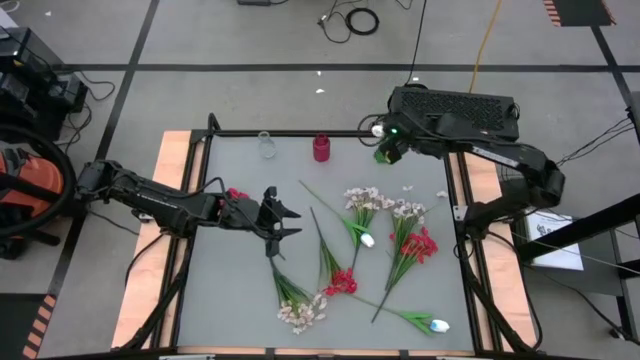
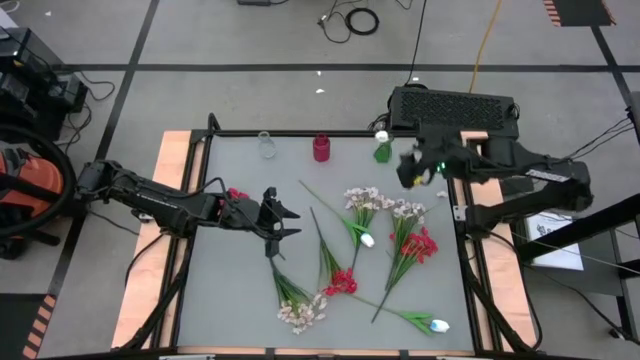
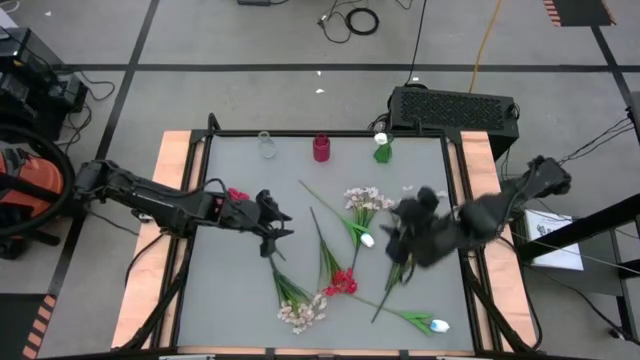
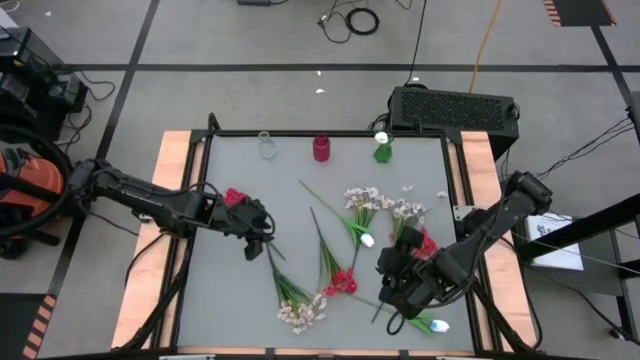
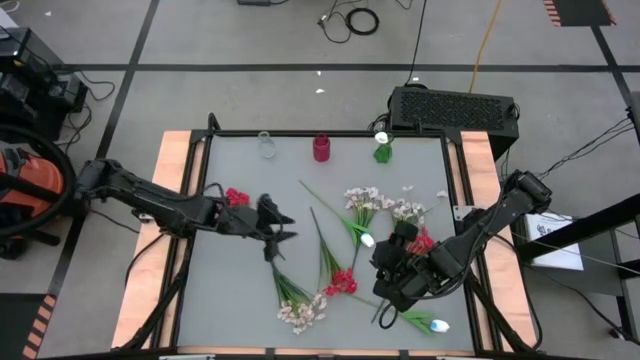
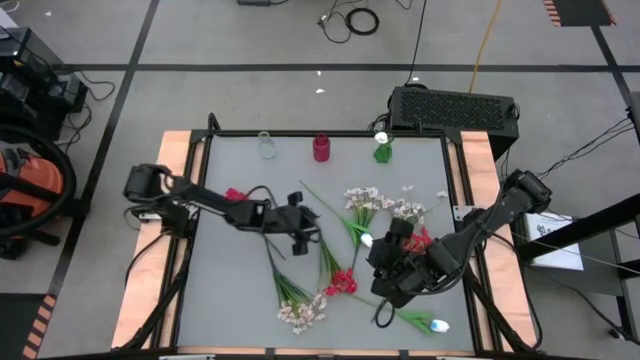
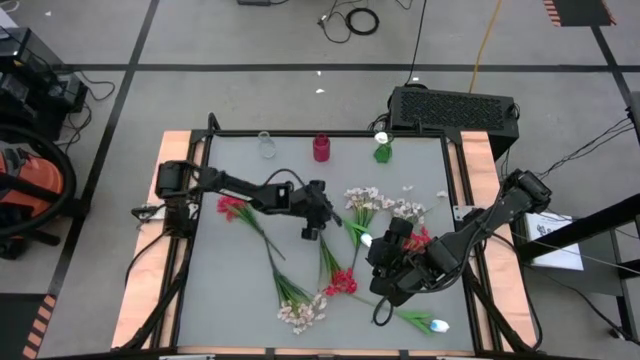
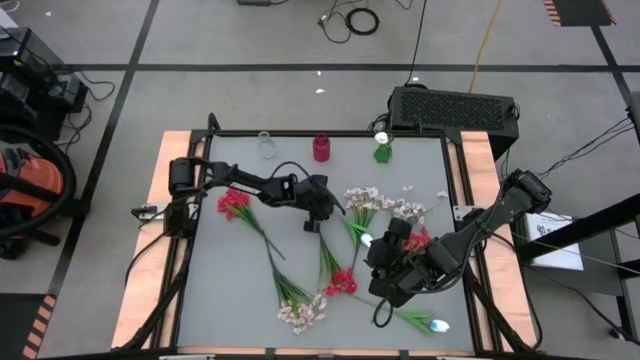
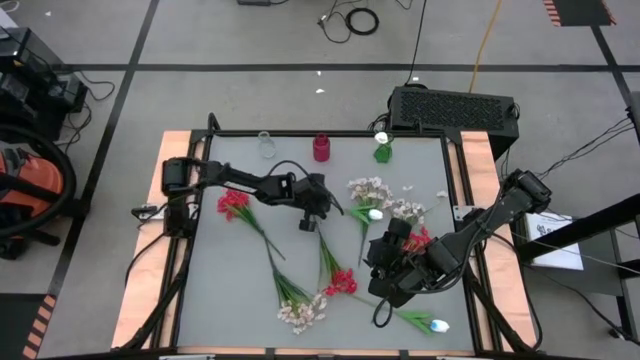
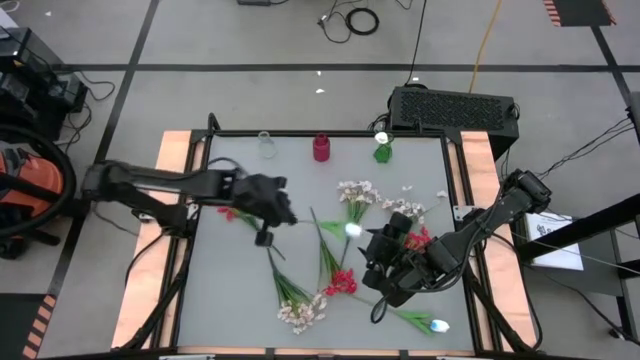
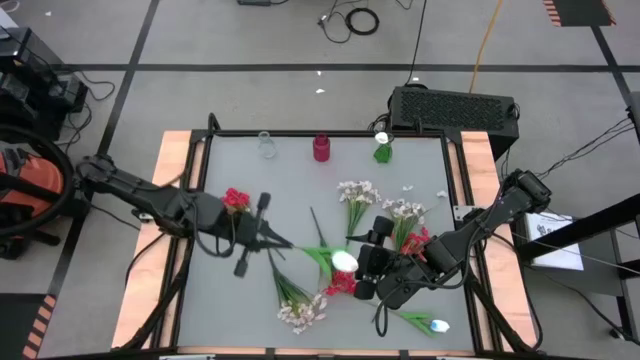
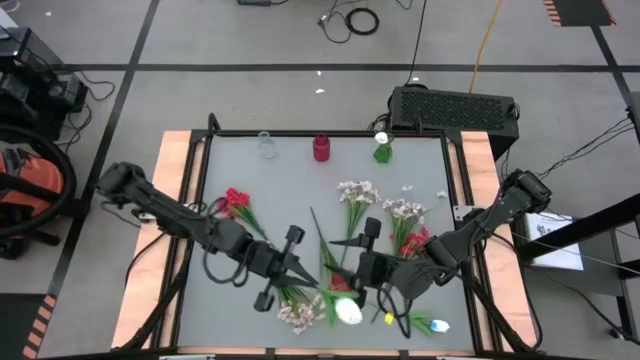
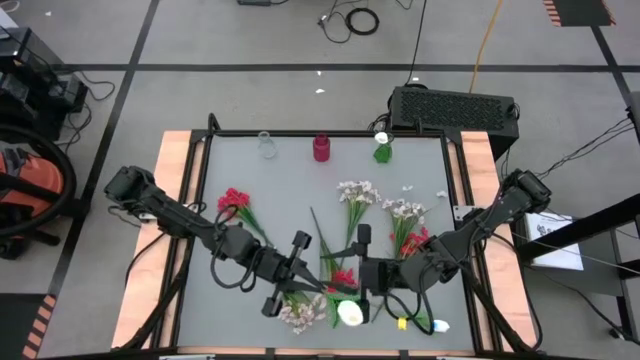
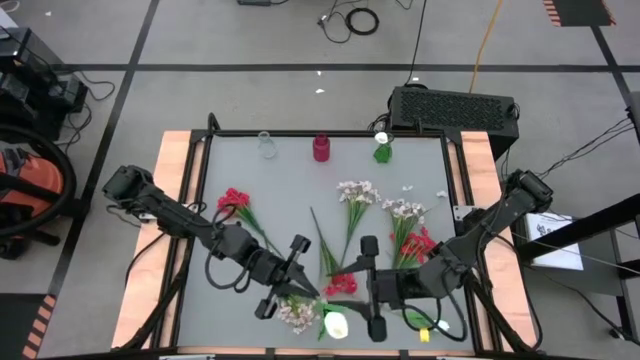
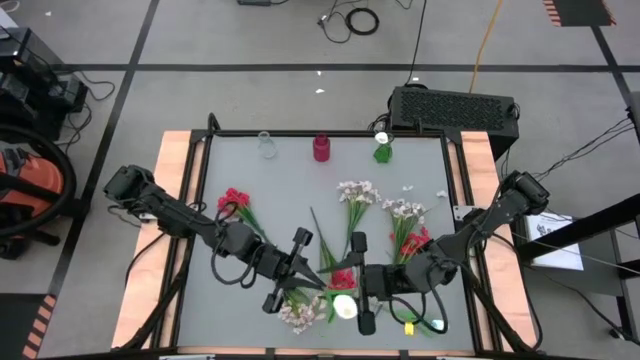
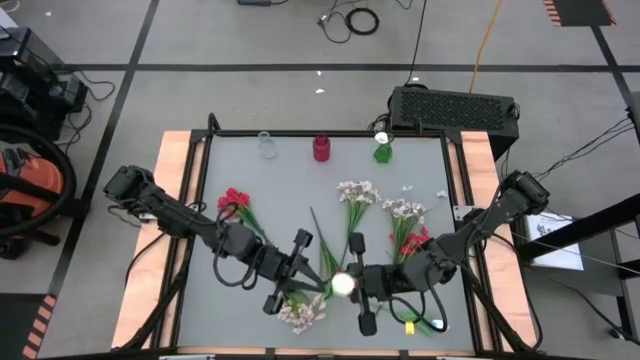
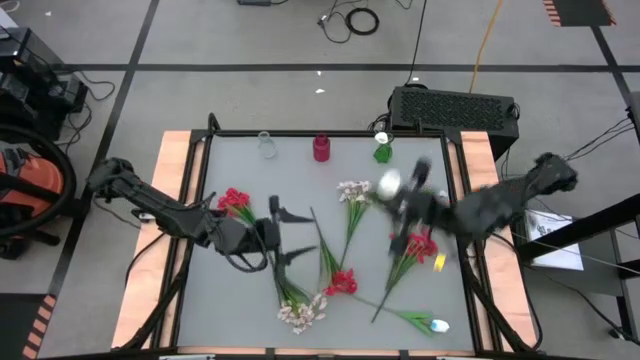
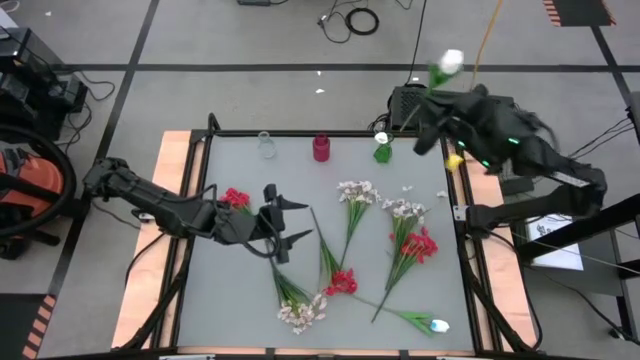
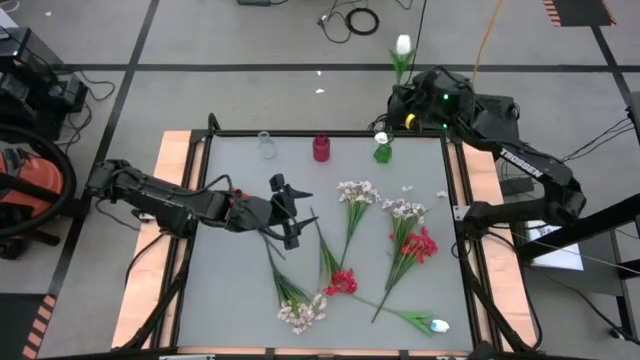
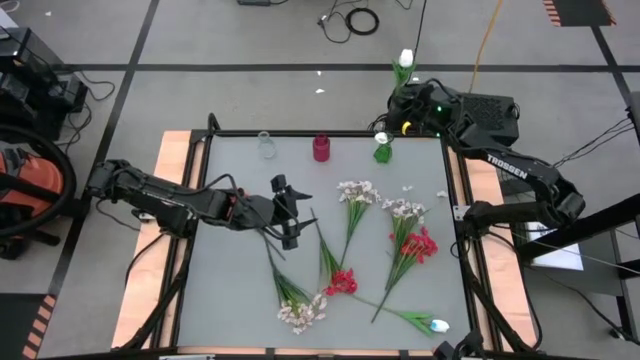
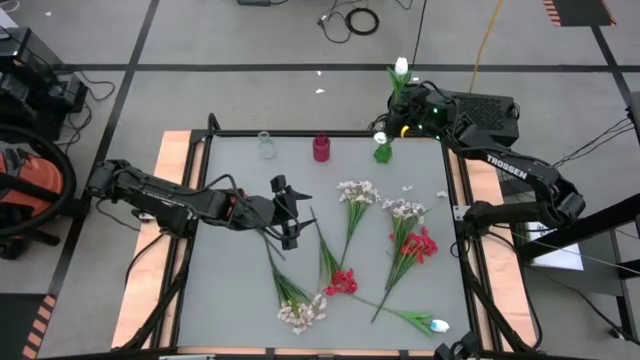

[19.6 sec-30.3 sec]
Task: Sort flowers into vase by color
Put the top white tulip into the green vase

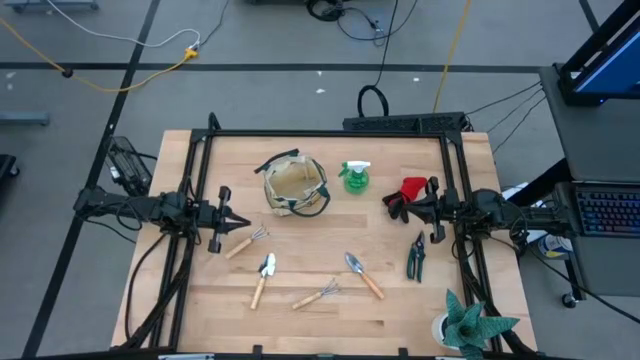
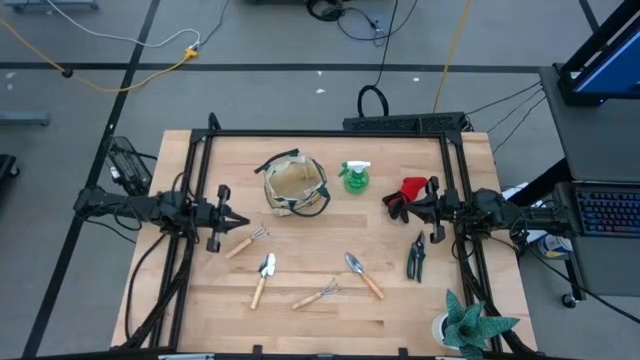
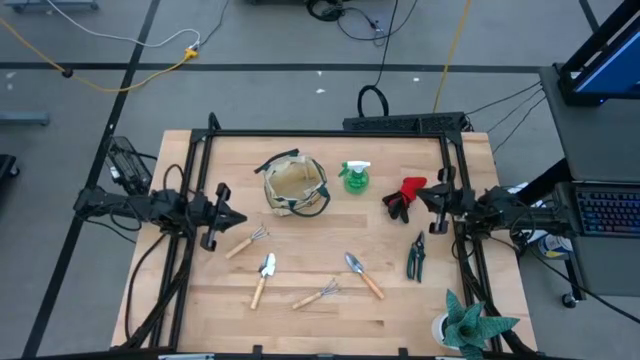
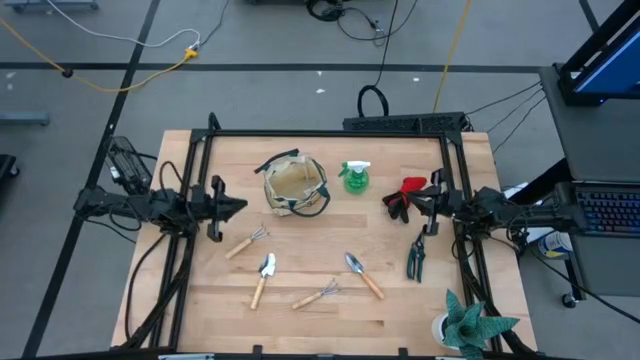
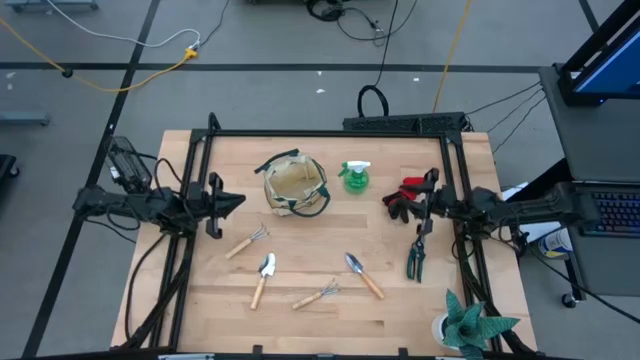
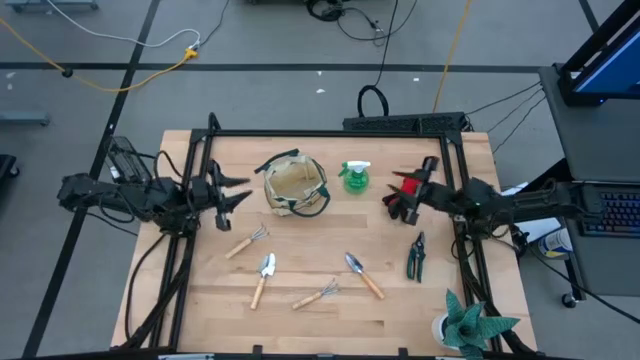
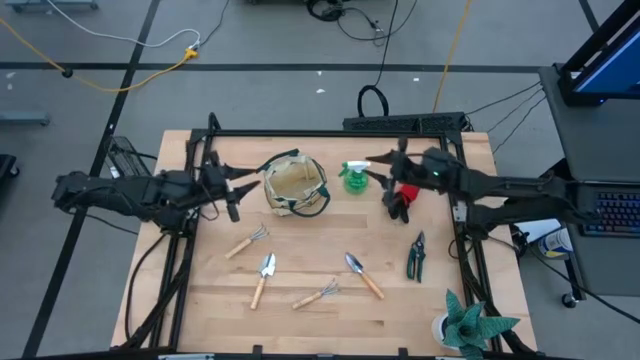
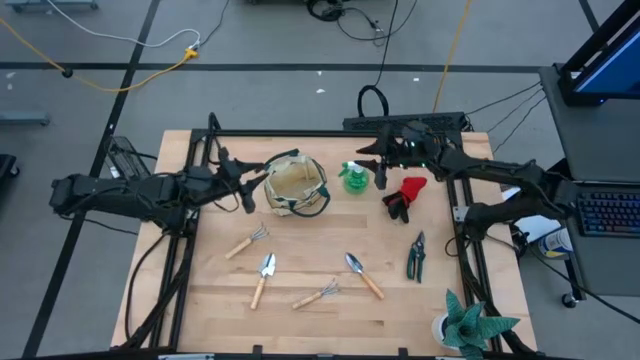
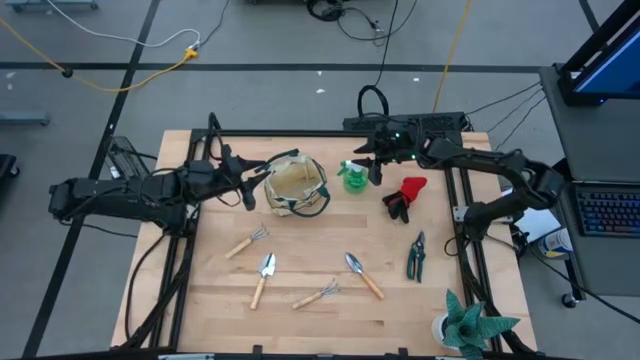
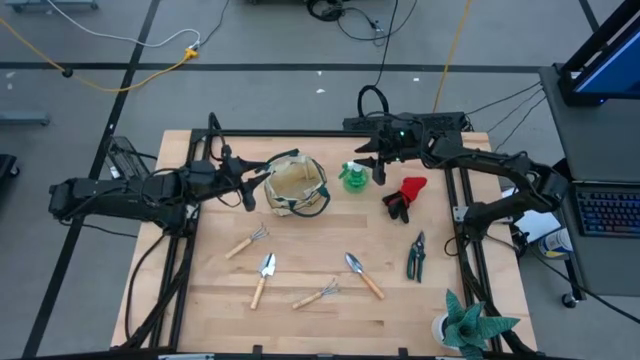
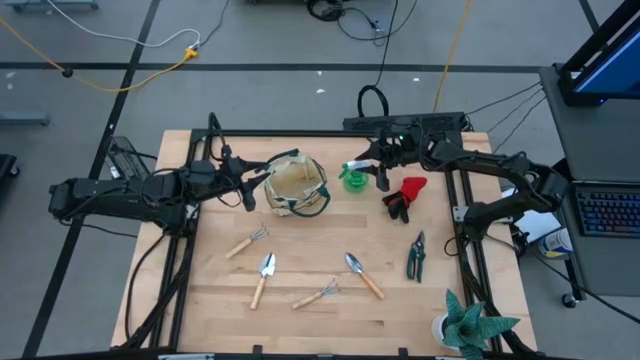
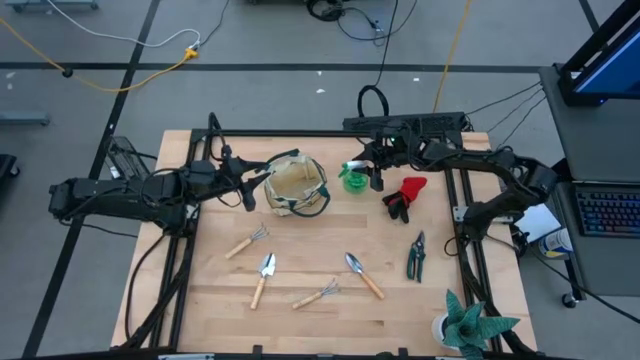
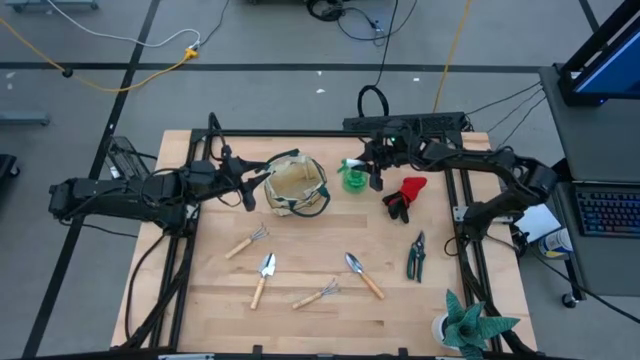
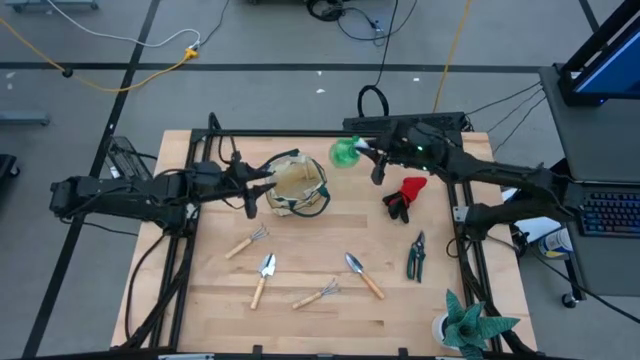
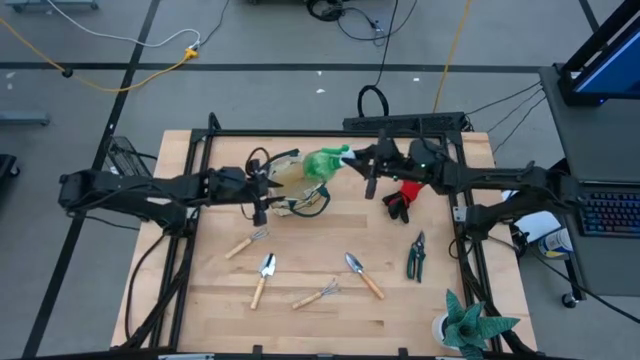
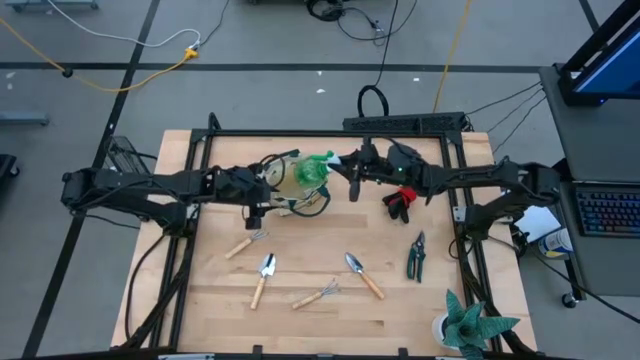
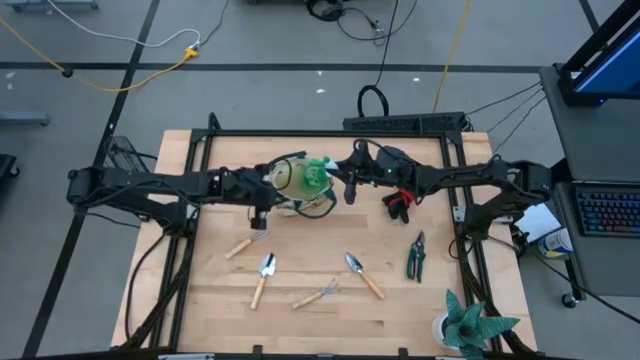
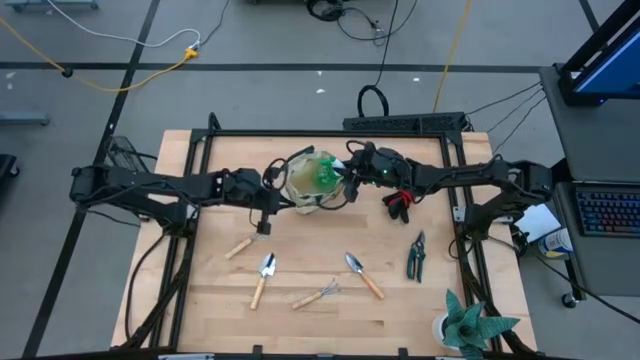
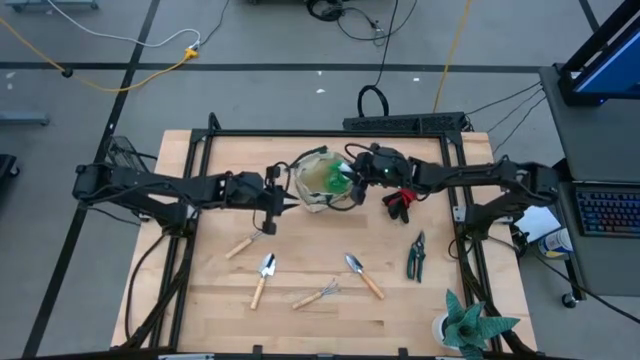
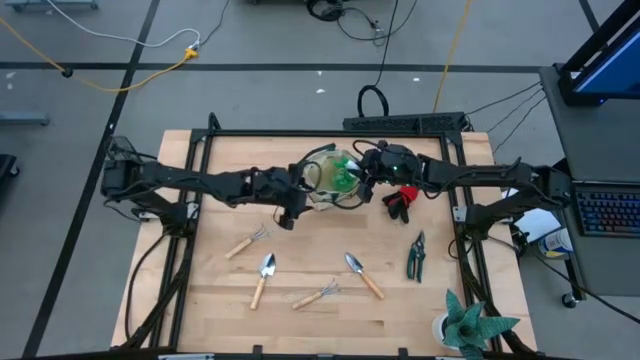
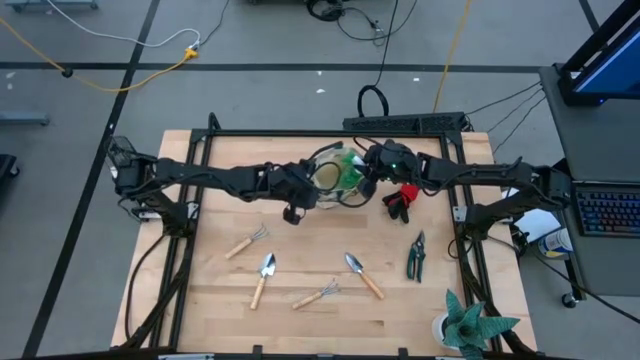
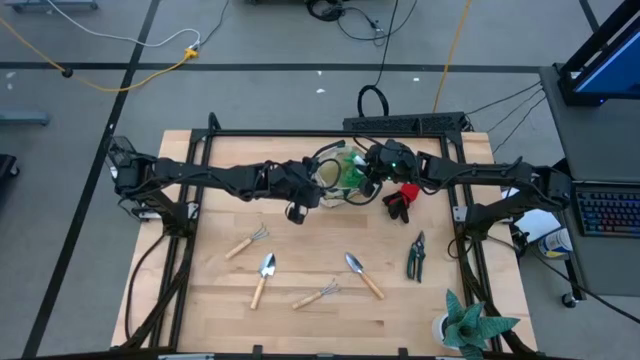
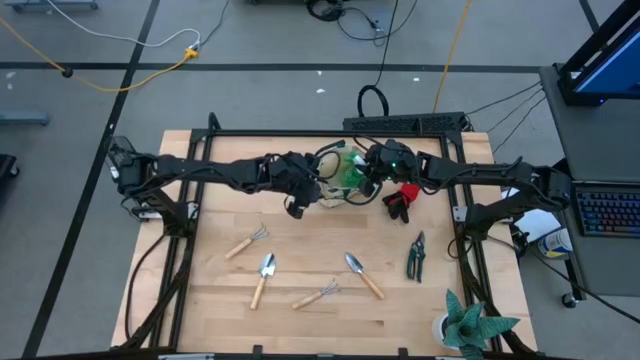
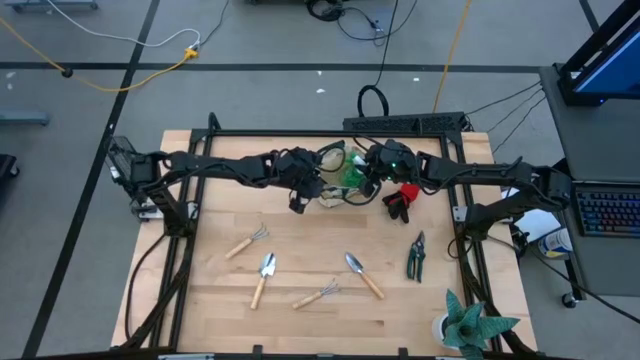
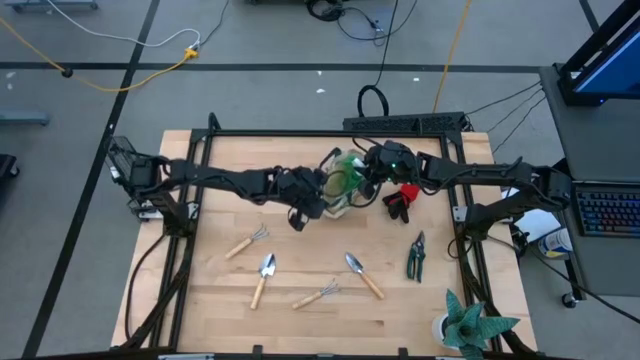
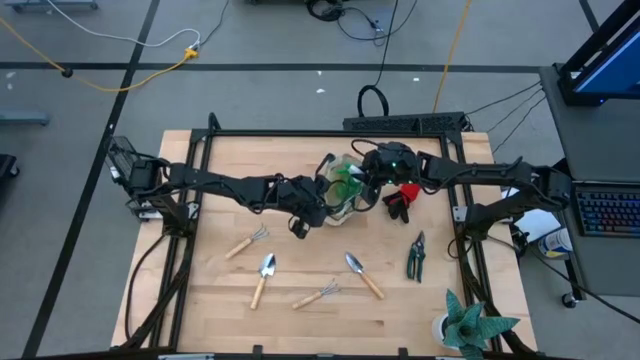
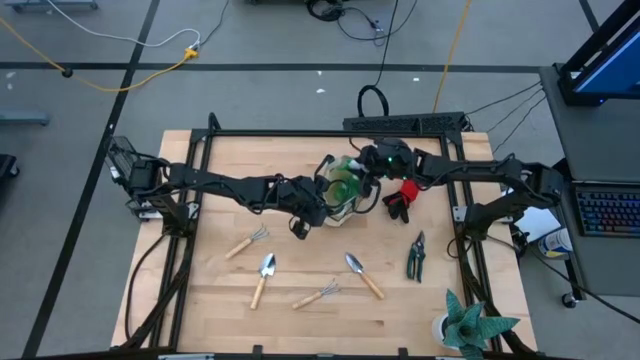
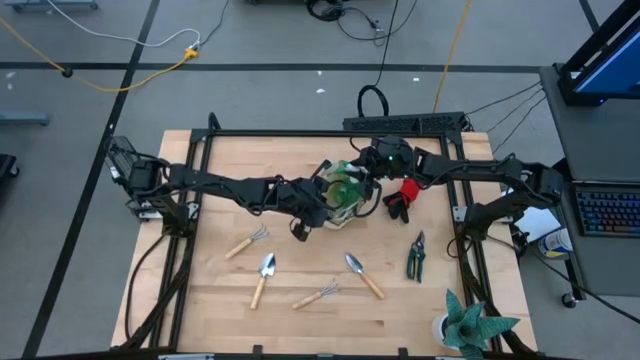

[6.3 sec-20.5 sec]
Task: Pick & Place Garden tools in Gardening bag
Put the green spray bottle into the brown gardening bag
